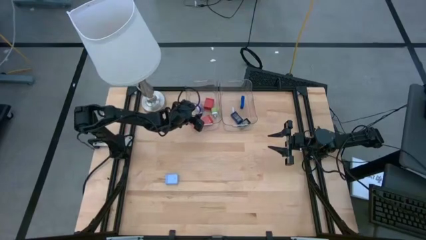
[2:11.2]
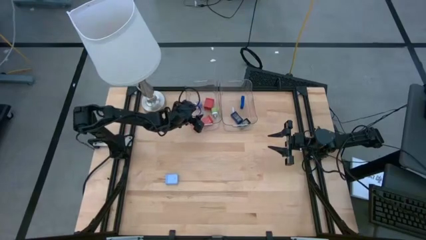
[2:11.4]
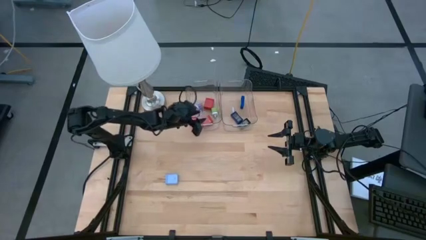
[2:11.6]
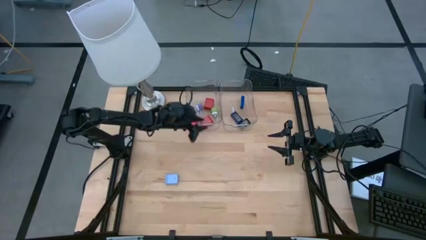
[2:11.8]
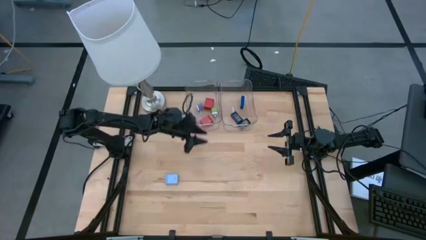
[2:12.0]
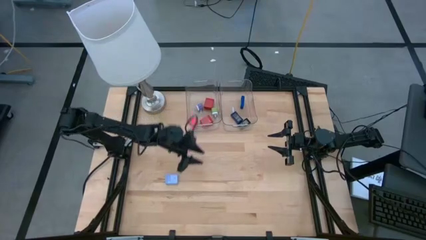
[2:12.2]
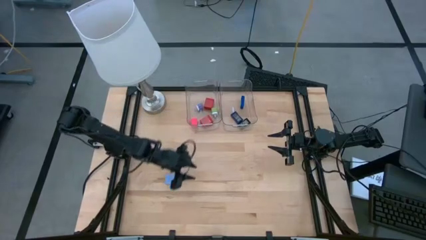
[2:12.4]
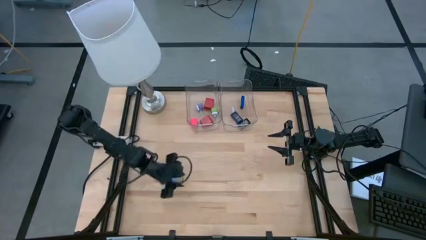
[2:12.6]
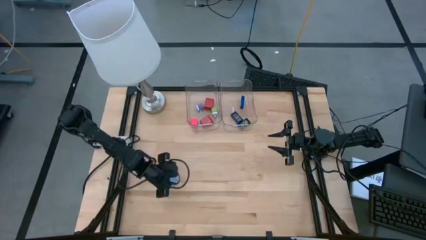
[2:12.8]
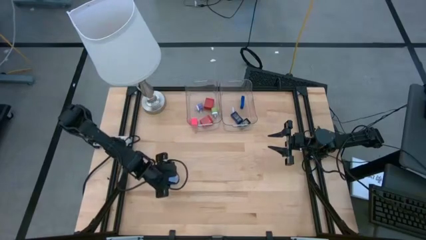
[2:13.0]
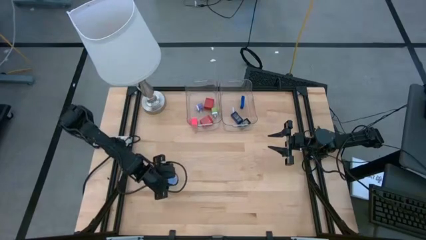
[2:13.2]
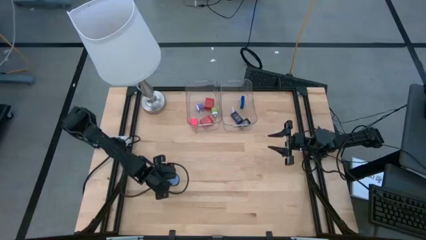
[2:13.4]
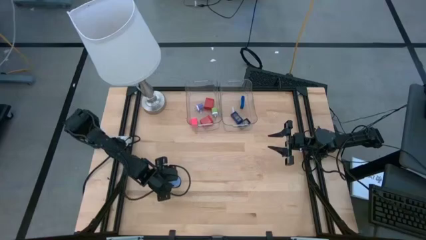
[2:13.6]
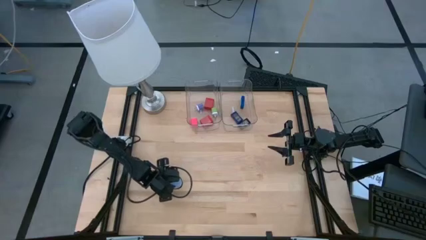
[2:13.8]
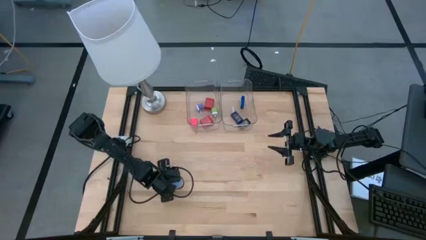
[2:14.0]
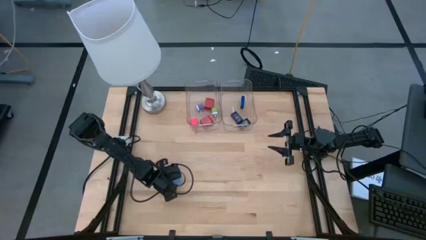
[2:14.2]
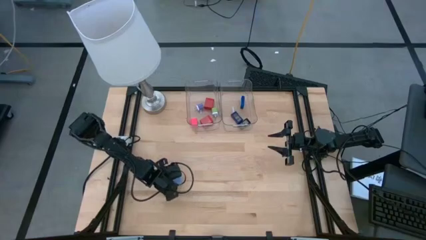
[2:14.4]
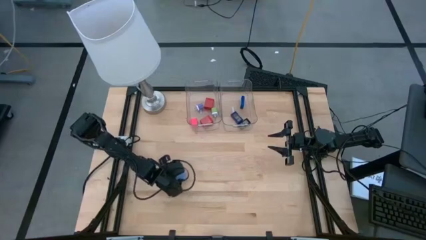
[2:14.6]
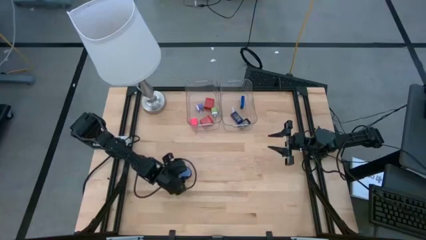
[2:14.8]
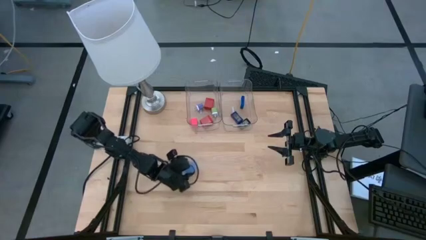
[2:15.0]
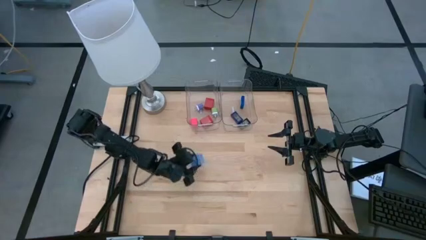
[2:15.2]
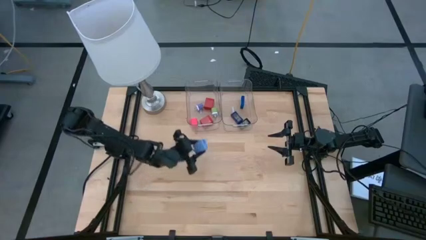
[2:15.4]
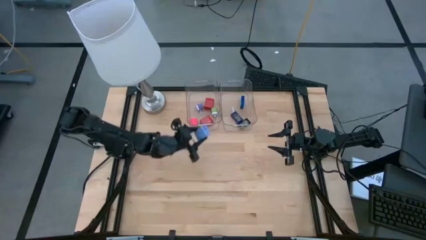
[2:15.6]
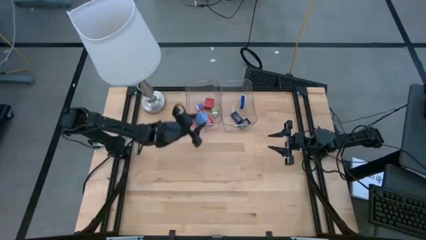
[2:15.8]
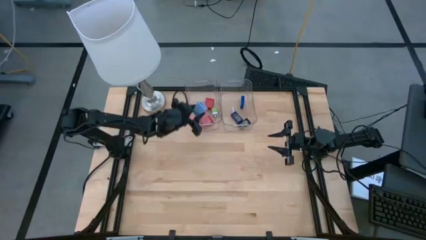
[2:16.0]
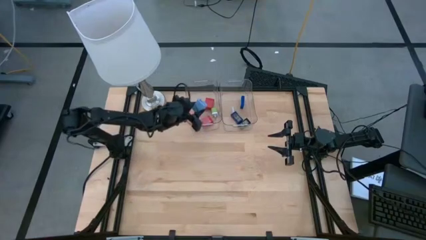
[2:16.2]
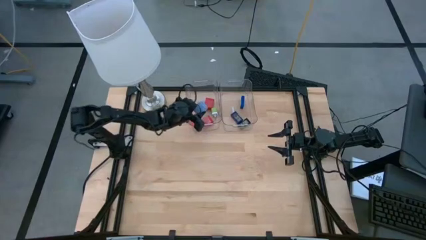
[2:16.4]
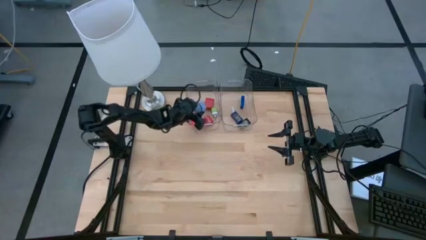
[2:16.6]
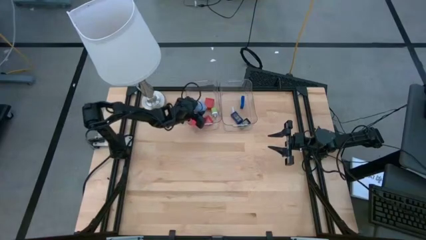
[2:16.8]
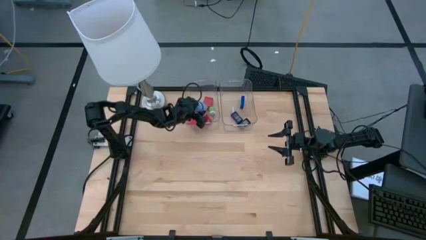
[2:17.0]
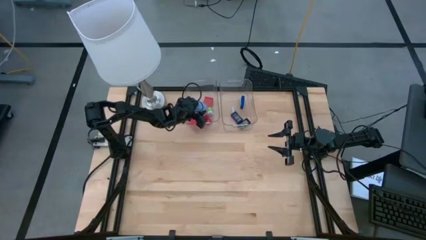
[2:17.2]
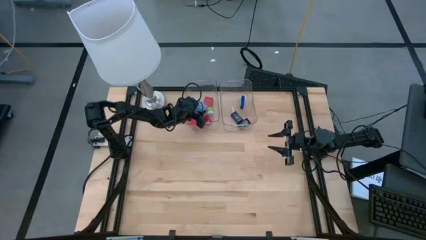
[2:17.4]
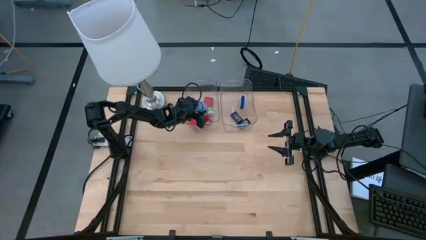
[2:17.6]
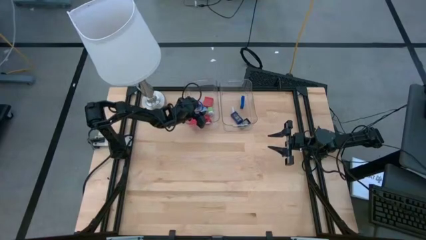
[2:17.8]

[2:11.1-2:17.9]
Task: Pick & Place Office items
Put the blue charger adapter into the left transparent bin

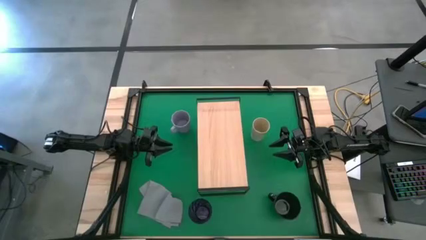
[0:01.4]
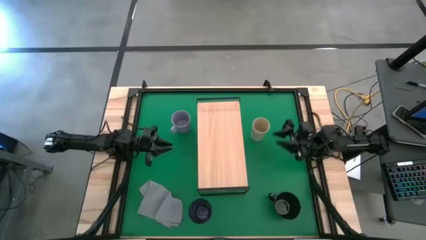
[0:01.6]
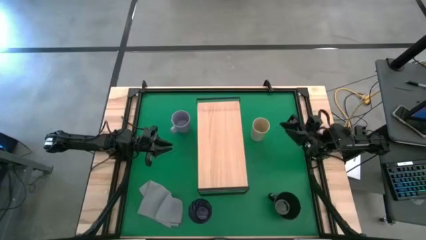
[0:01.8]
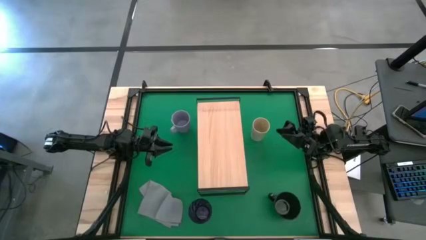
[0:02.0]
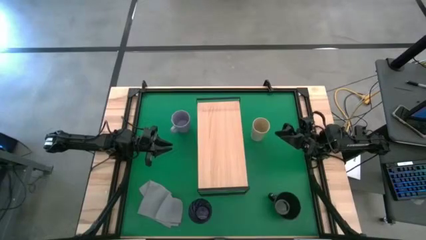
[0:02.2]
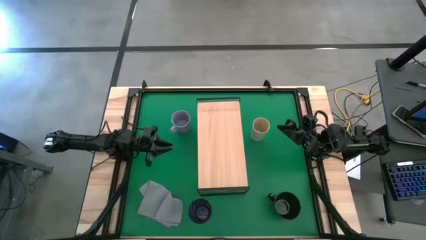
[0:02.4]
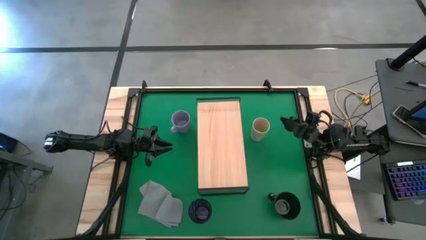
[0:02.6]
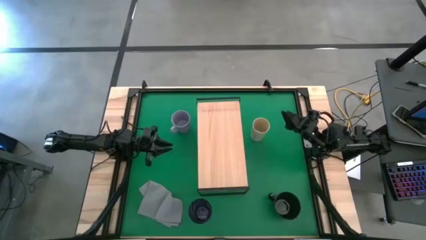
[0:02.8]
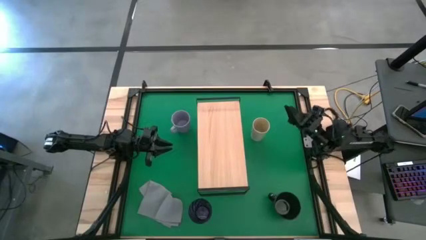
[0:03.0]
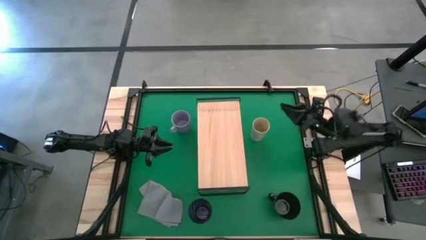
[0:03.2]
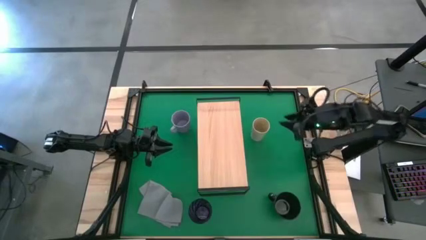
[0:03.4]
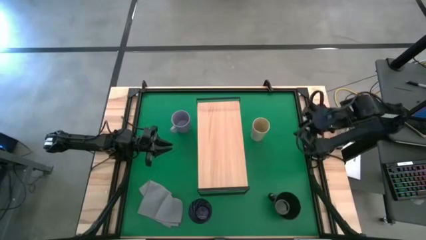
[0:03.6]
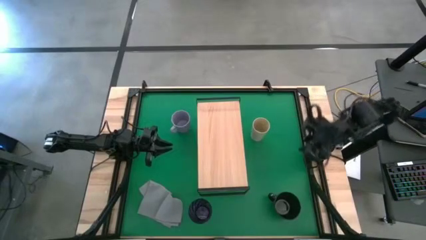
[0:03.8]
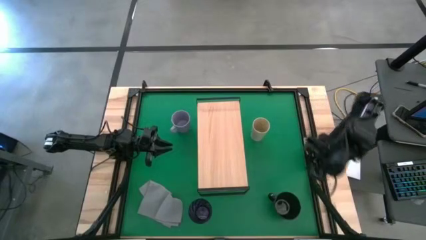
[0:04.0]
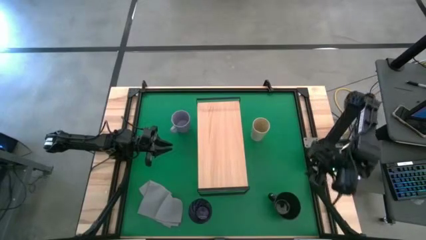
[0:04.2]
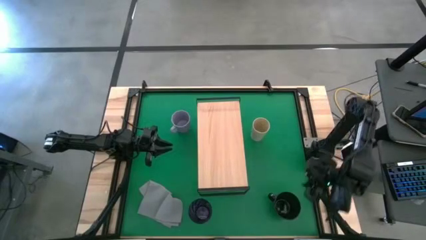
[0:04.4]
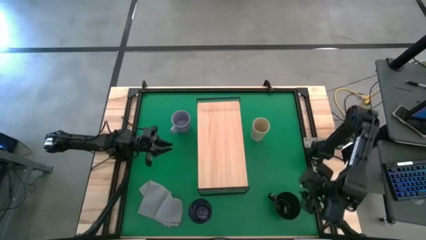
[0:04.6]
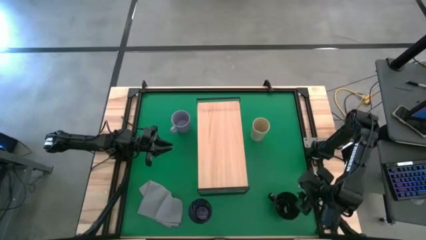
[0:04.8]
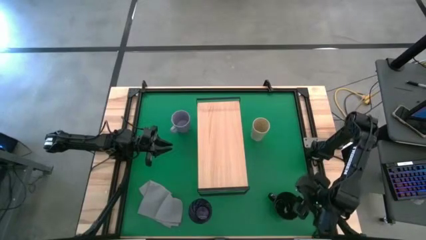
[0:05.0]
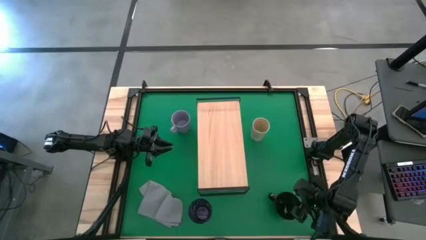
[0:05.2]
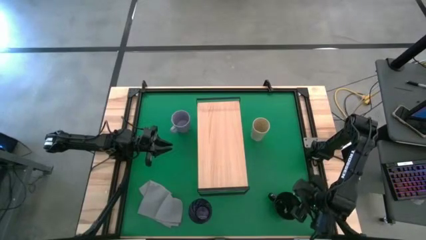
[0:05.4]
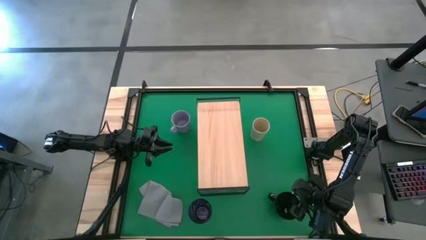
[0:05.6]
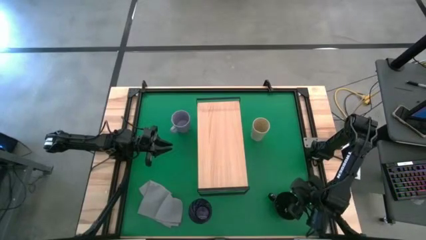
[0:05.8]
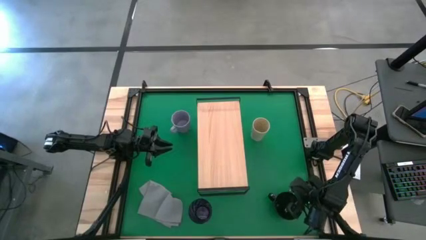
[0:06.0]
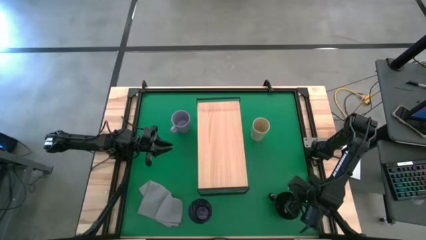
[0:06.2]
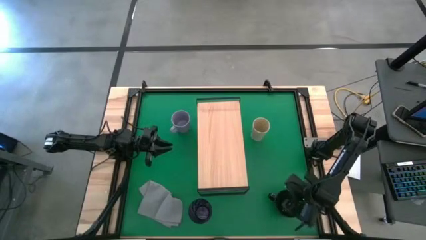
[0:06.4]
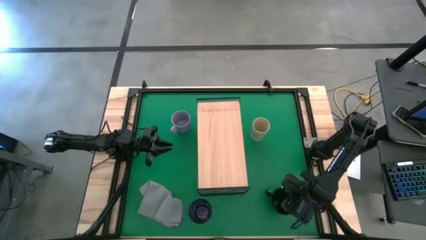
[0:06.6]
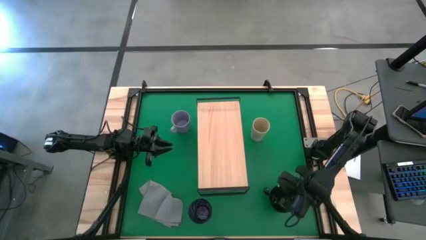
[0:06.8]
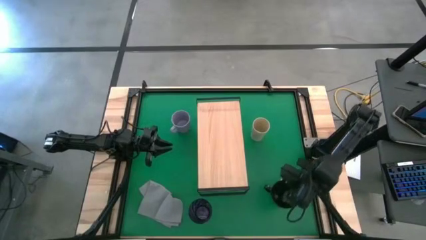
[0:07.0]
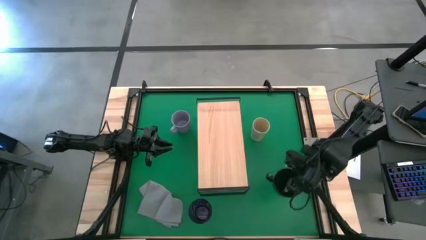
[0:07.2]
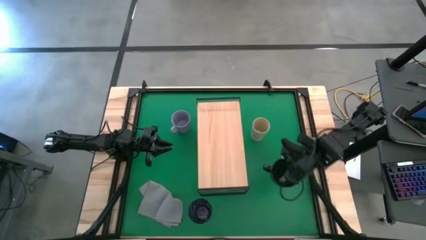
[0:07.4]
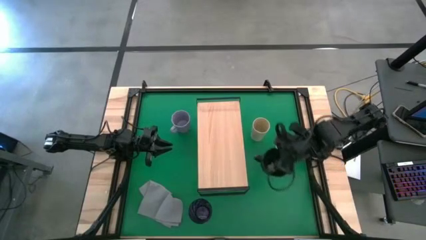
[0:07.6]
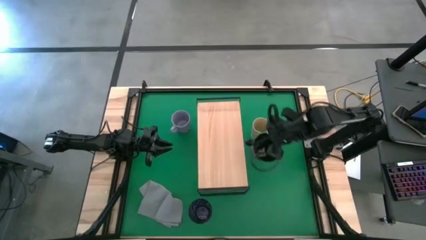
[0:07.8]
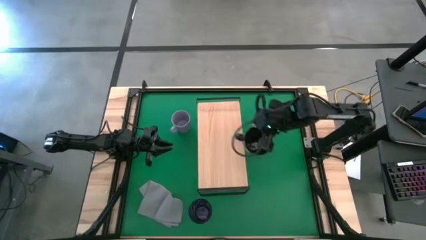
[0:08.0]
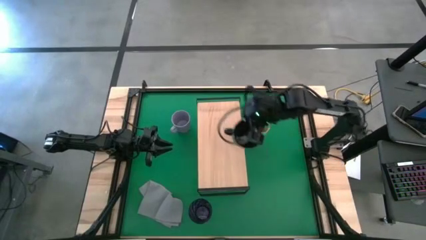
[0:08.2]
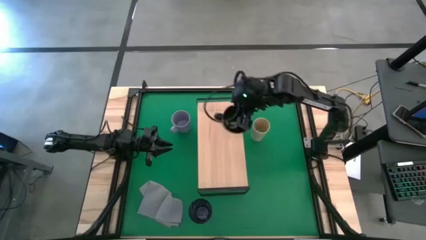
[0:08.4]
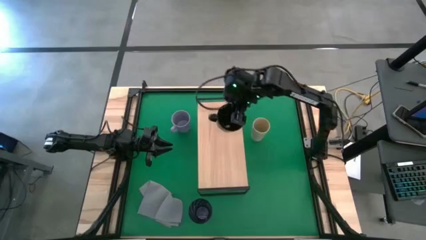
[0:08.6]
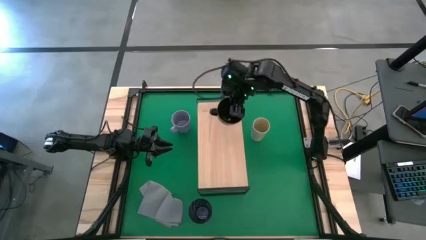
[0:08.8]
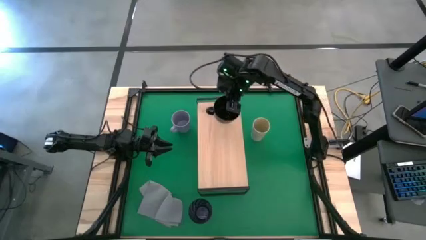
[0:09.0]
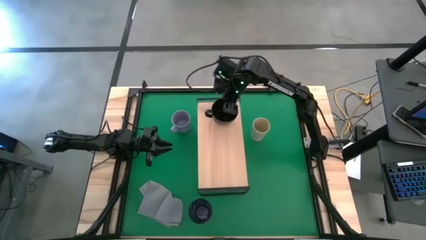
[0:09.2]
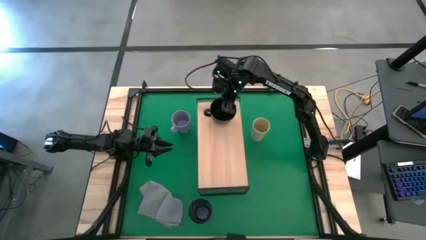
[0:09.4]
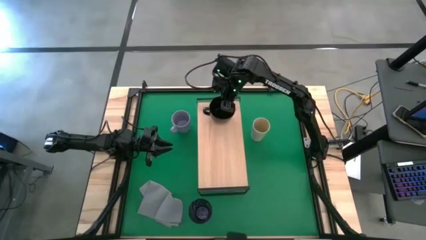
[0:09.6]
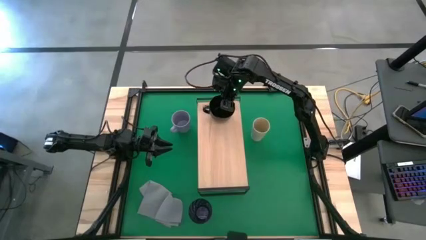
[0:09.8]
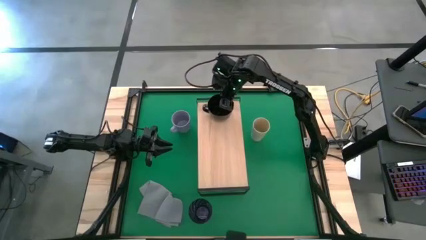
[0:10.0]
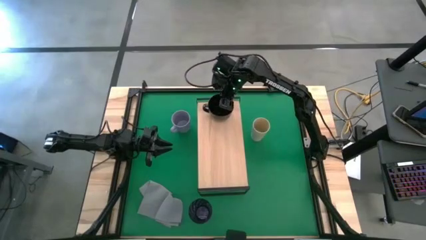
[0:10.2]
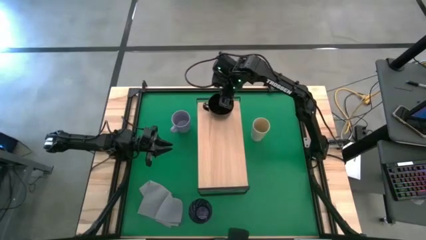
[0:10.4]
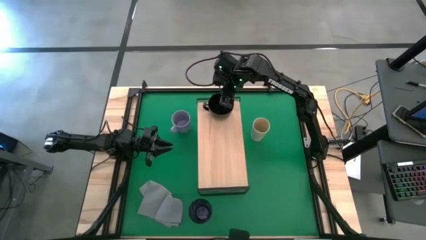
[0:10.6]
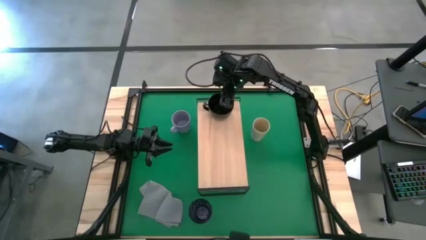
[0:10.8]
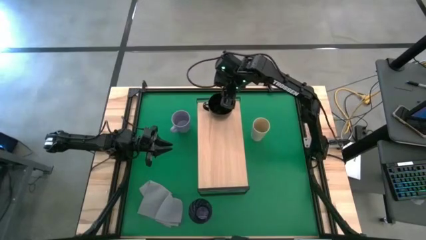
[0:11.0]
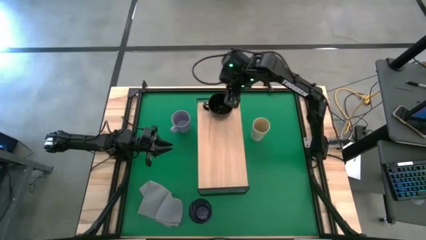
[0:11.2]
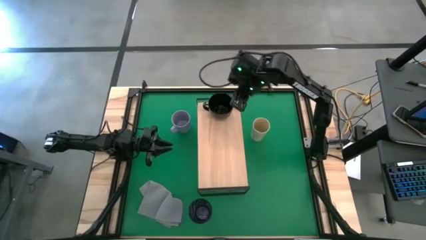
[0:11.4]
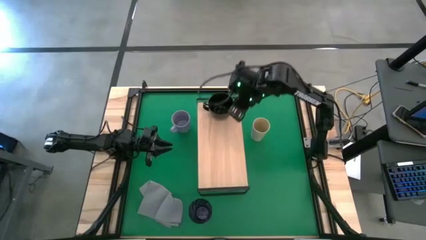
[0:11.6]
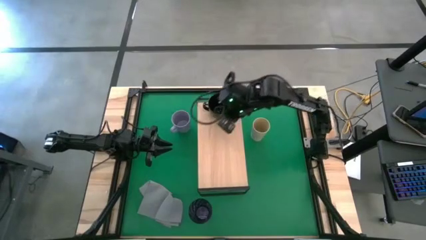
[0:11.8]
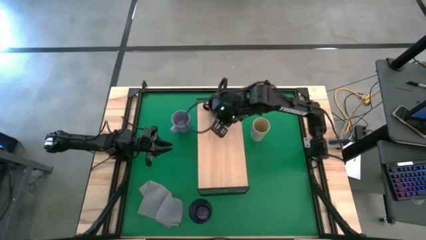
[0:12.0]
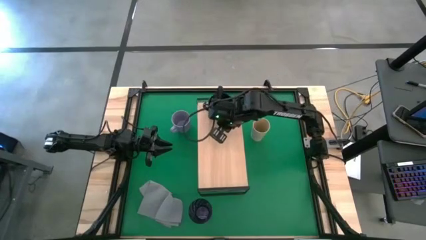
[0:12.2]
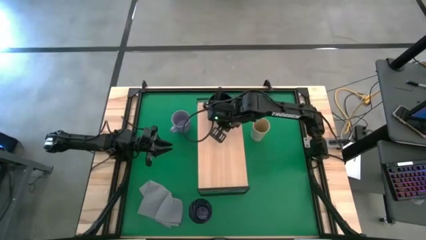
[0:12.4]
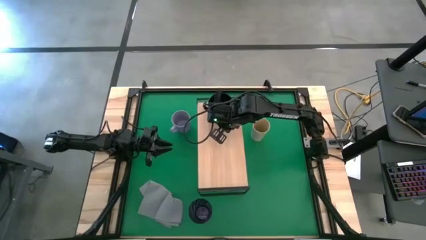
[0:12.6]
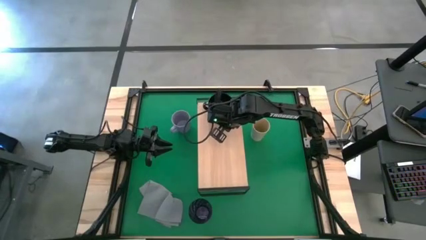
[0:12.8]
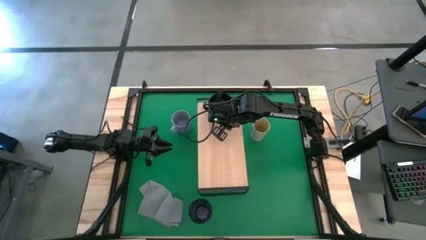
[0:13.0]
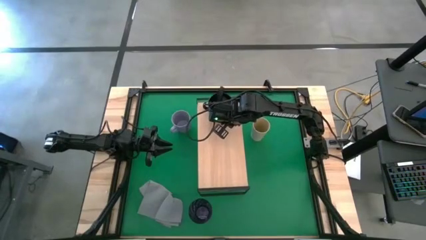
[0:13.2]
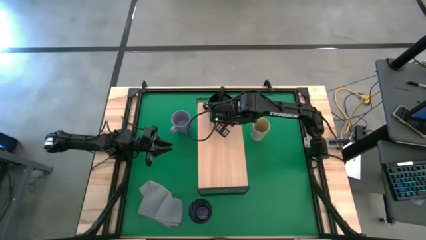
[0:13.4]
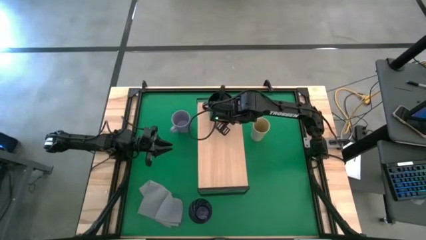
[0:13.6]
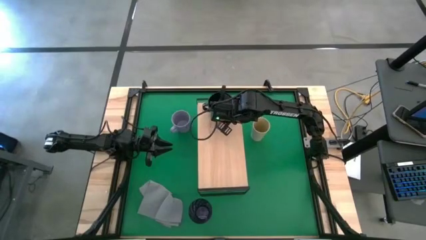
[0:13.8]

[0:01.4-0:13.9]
Task: Stack small to large cups/mugs on shelf
Put the black cup on the shelf
